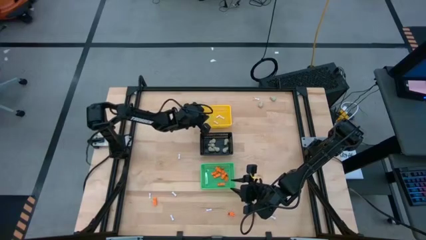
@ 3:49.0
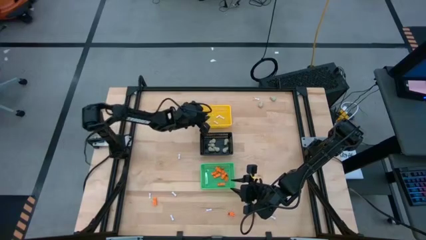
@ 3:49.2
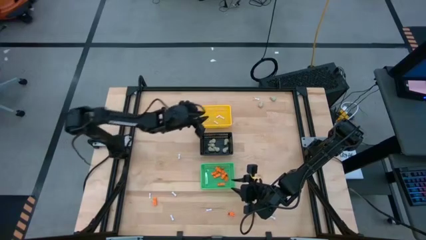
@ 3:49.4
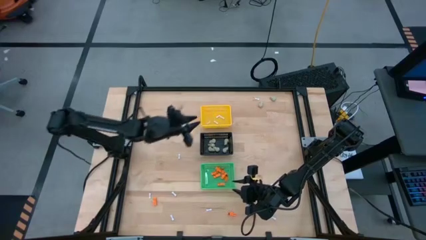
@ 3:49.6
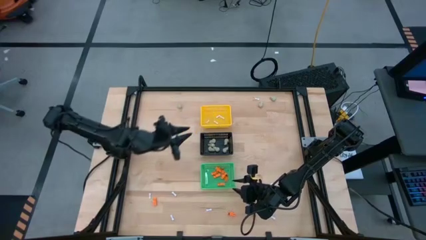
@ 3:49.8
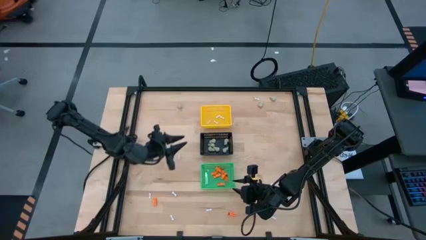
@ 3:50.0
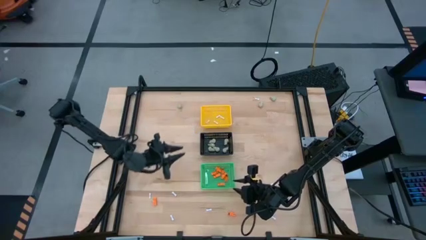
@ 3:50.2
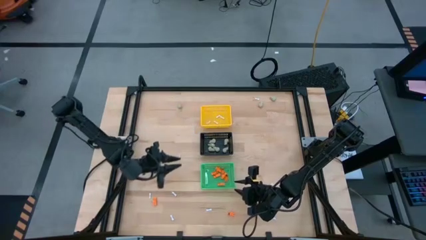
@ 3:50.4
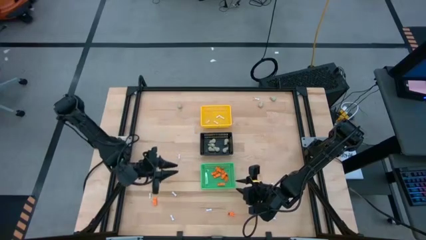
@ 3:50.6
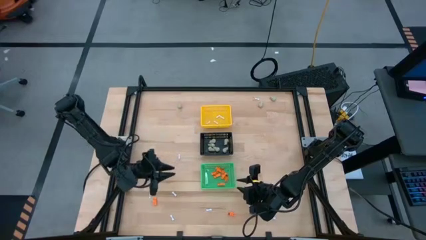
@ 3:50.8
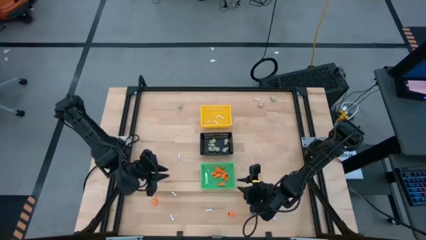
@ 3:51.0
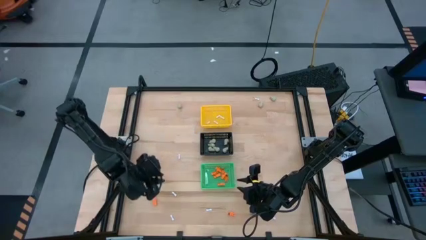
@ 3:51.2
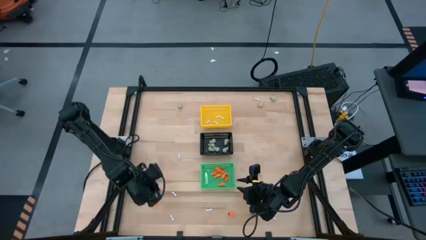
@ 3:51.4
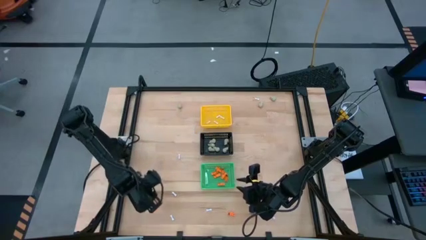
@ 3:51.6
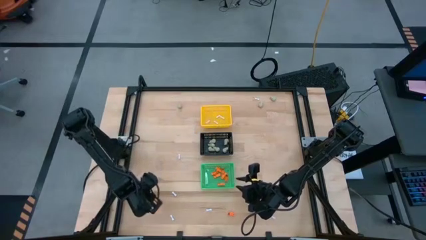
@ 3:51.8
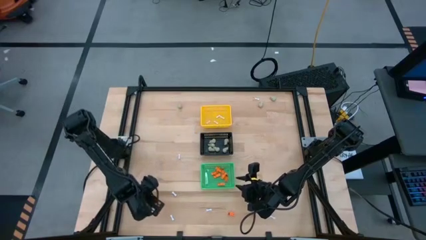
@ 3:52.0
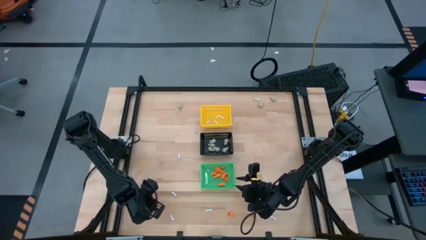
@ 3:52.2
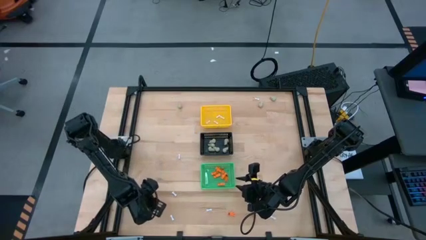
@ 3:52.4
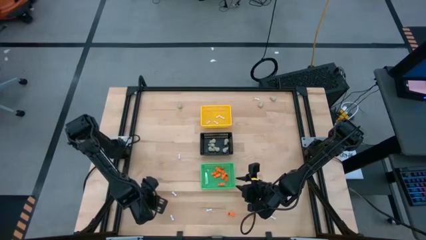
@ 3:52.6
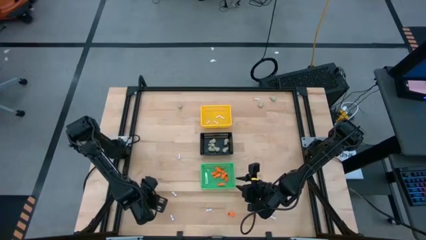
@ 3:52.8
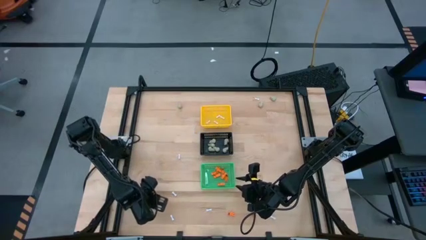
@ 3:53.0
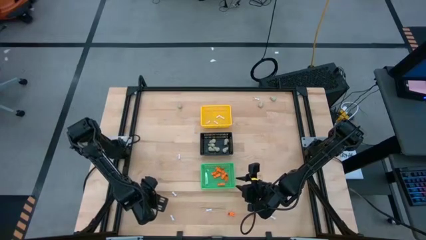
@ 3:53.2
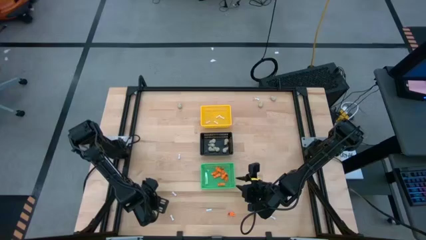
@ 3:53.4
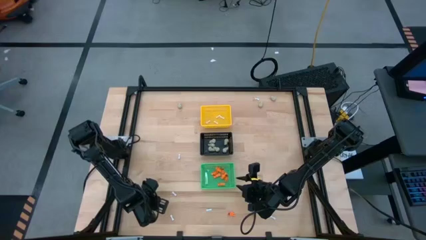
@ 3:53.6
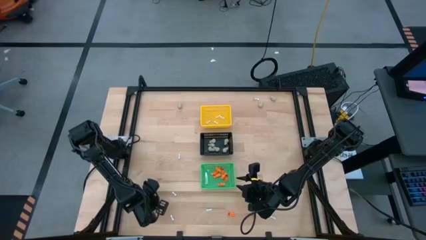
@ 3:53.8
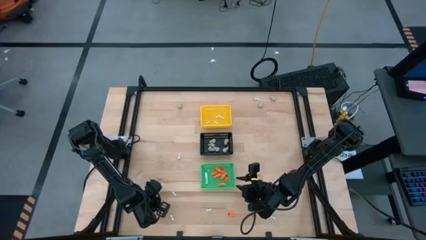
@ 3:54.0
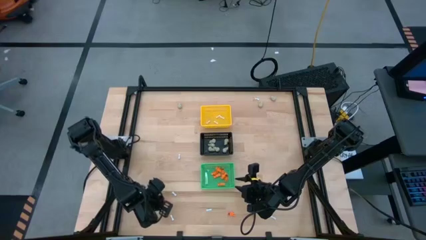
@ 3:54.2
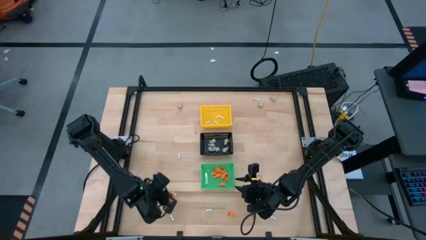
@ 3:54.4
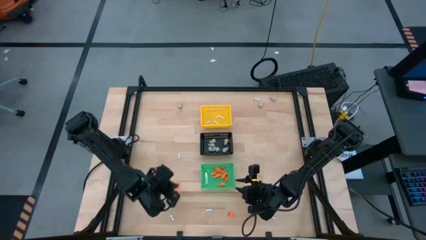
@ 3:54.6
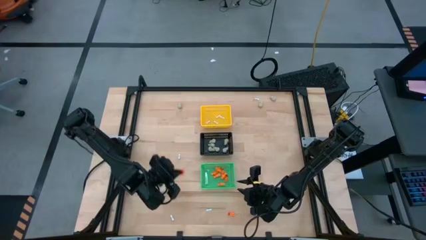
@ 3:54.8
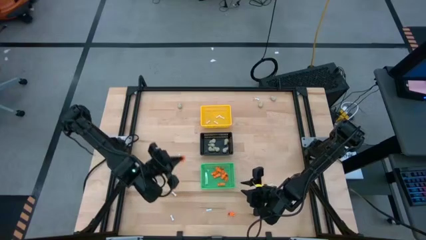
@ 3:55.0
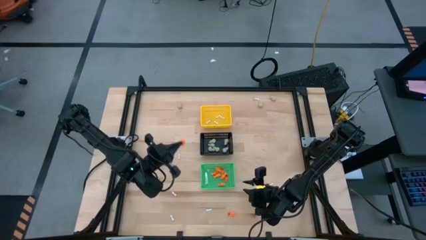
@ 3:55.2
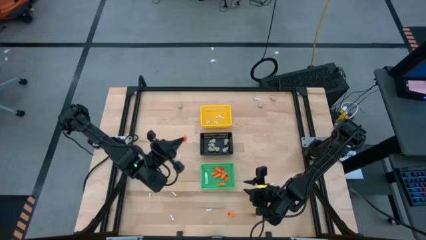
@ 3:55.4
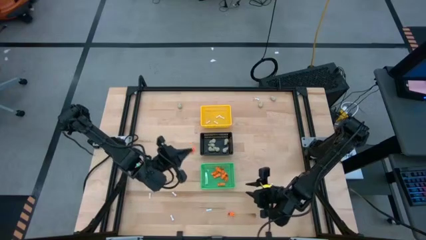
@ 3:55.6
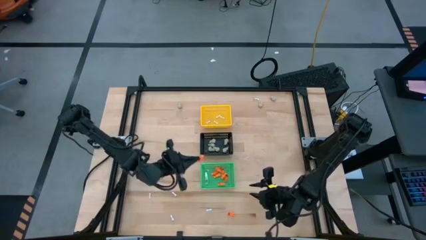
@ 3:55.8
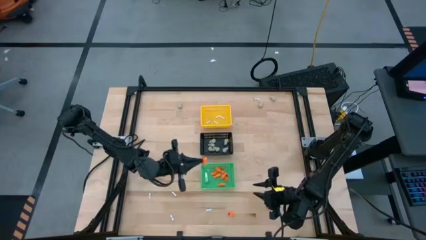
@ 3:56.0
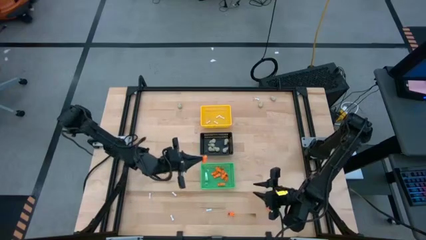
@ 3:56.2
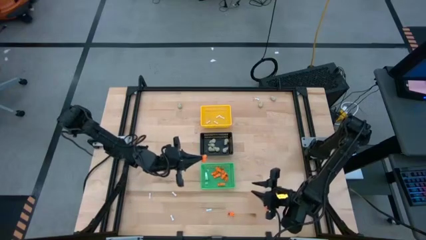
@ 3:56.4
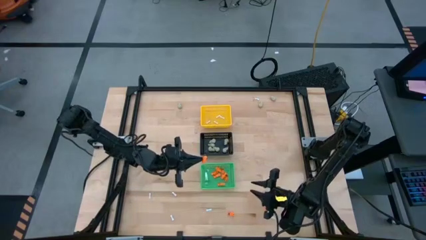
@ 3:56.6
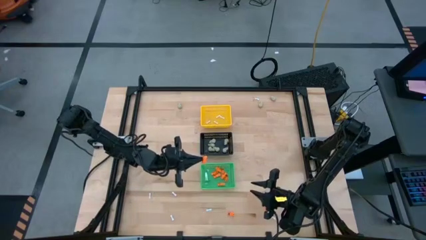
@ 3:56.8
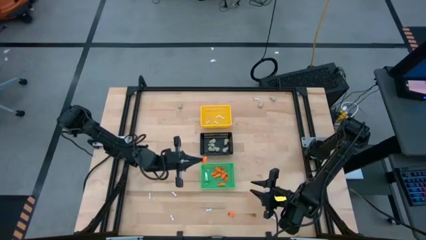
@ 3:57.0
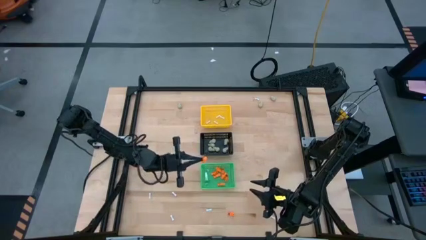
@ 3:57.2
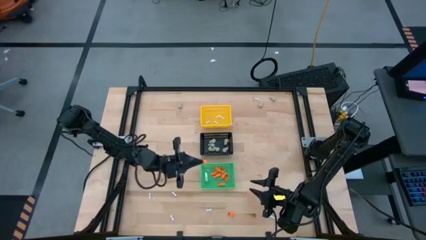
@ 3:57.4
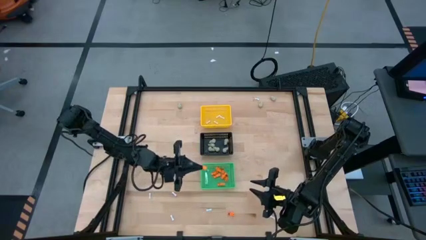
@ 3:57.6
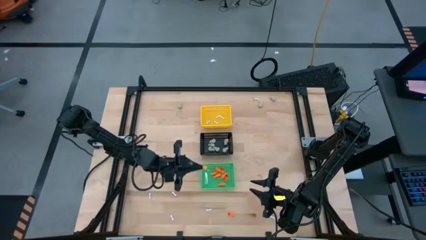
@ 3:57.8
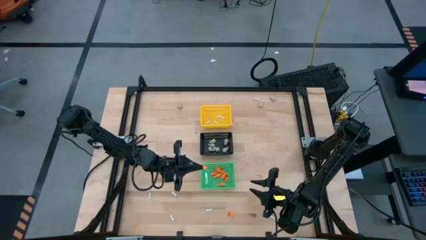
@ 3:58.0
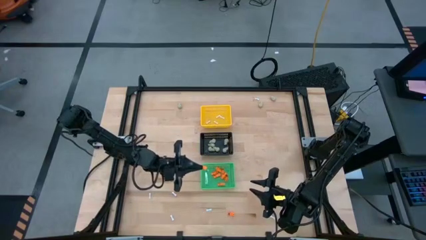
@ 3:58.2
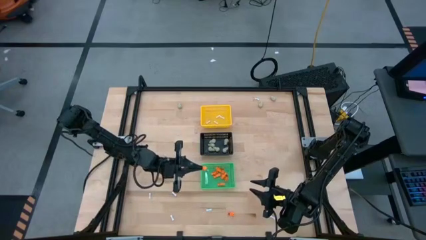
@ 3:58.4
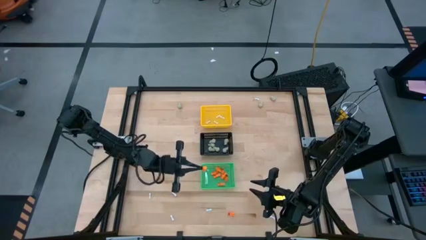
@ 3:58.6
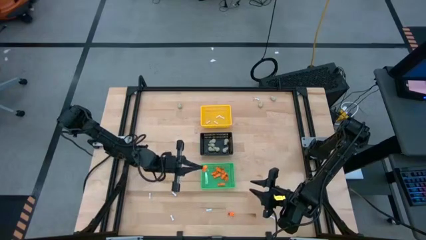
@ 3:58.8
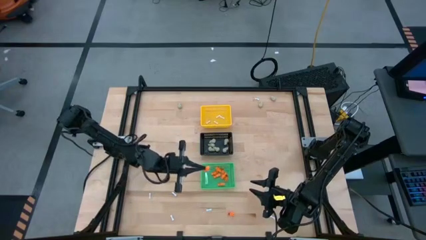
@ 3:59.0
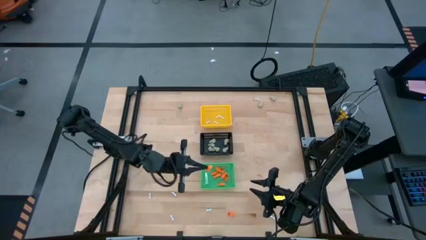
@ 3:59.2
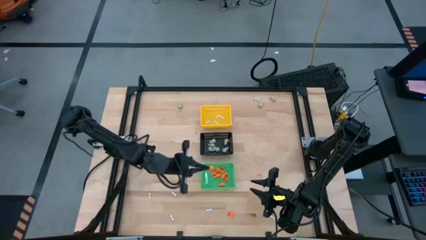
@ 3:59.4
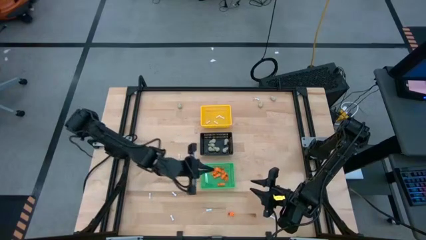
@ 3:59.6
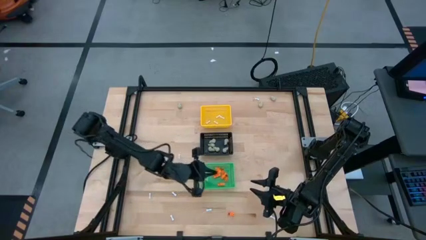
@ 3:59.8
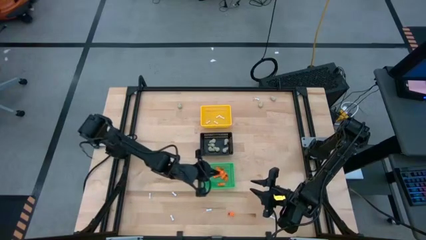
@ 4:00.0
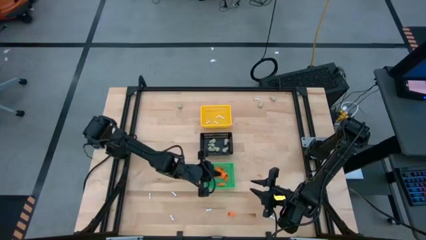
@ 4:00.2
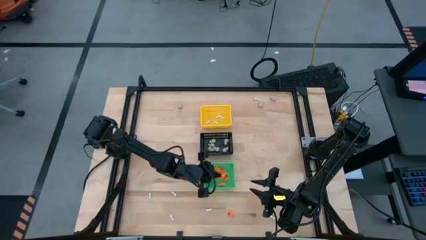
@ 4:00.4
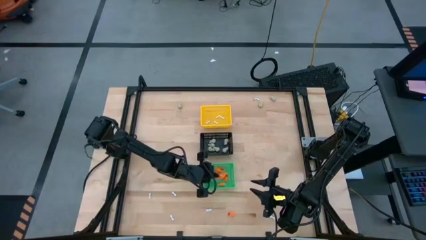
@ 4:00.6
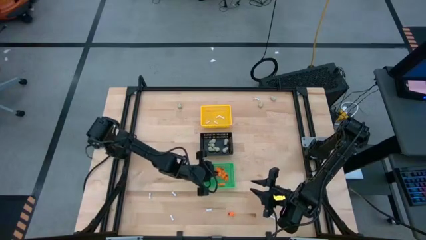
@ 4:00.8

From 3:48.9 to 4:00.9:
Task: Sort Halloween decoration
Put the orange skeleton toy into the green basket
